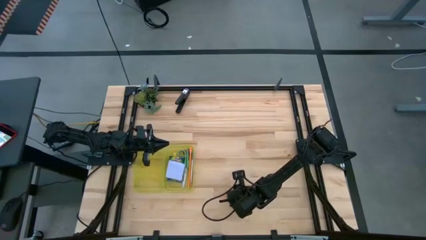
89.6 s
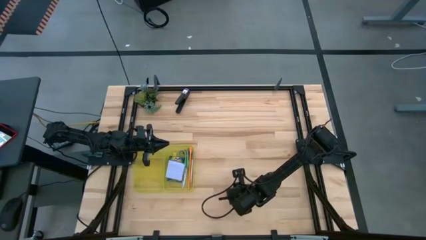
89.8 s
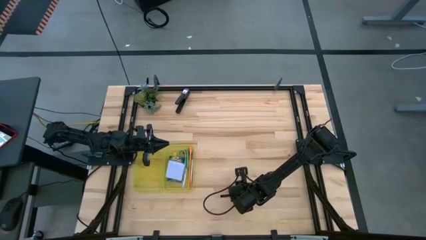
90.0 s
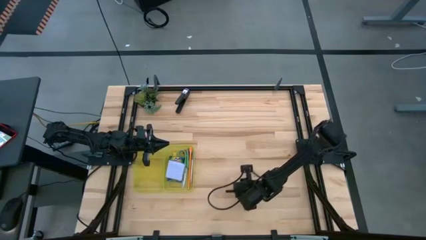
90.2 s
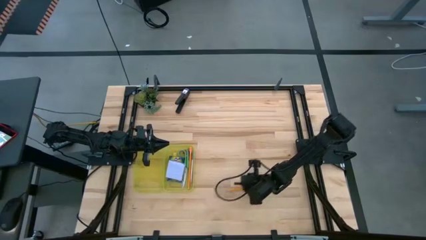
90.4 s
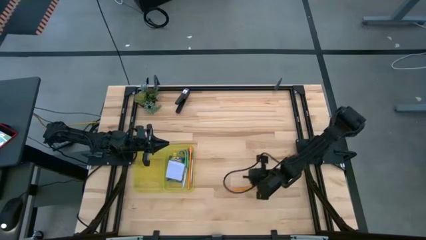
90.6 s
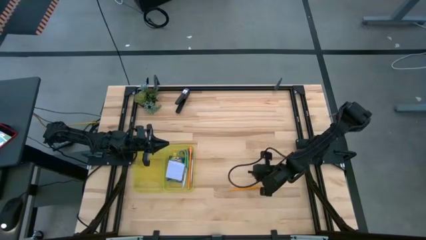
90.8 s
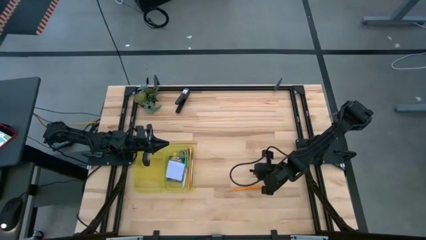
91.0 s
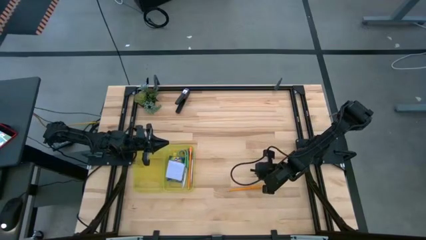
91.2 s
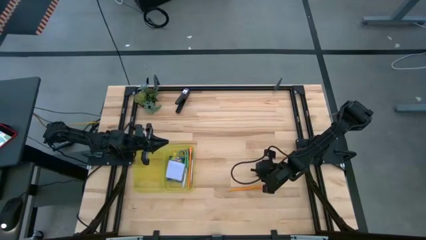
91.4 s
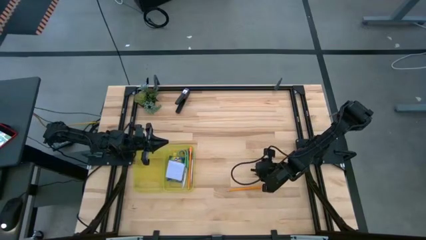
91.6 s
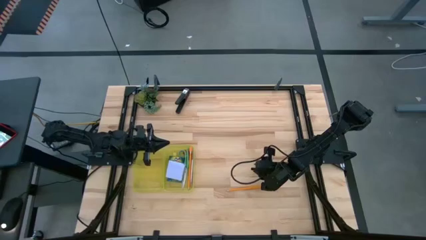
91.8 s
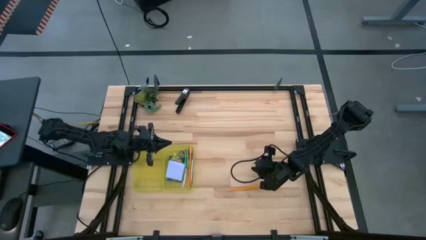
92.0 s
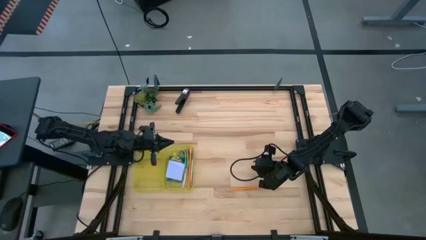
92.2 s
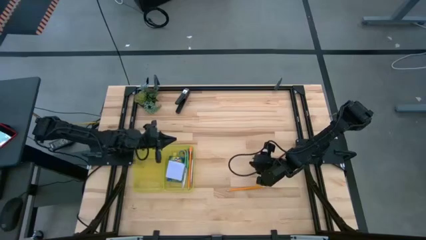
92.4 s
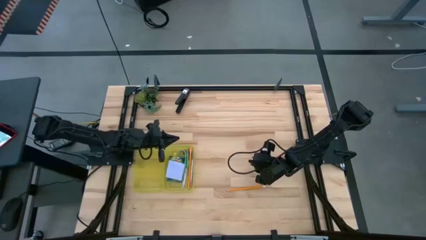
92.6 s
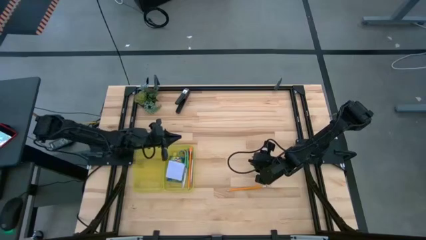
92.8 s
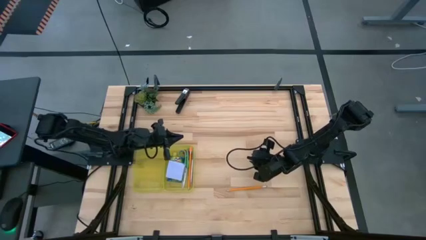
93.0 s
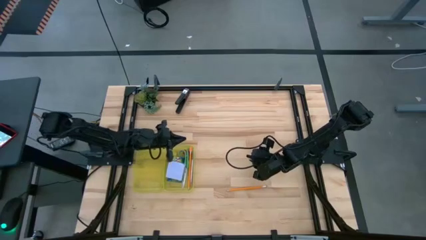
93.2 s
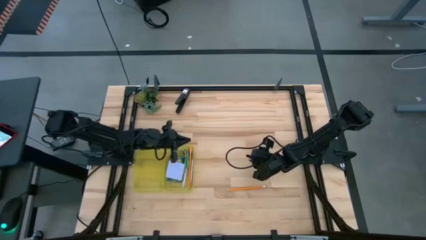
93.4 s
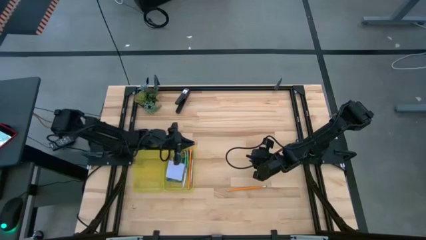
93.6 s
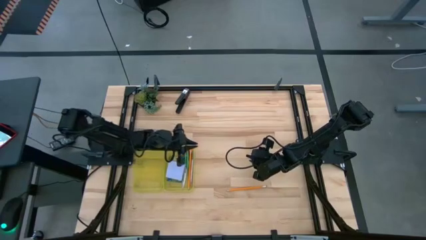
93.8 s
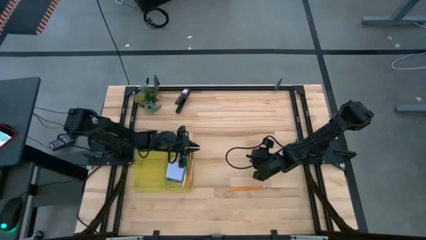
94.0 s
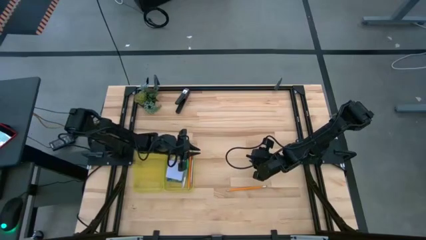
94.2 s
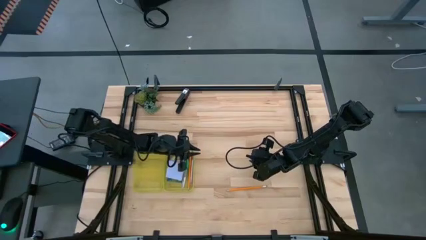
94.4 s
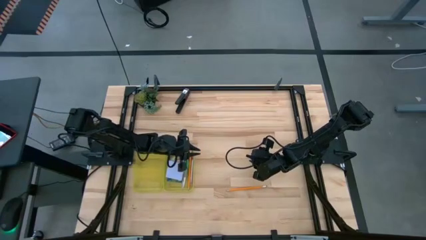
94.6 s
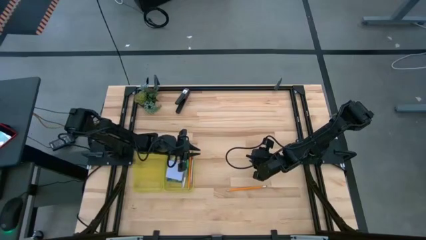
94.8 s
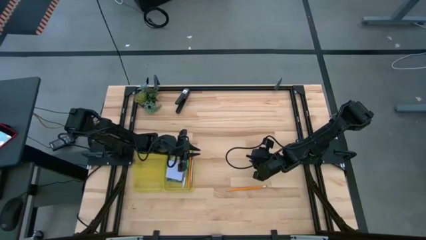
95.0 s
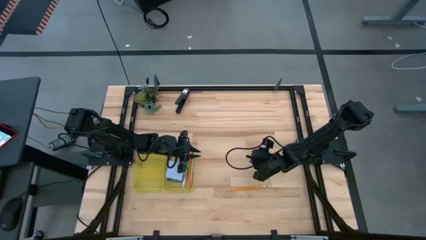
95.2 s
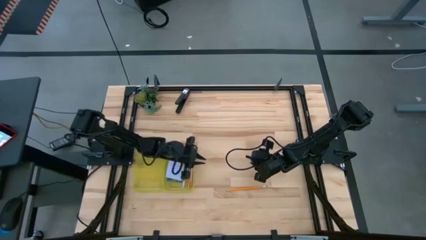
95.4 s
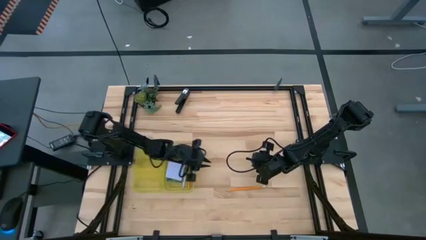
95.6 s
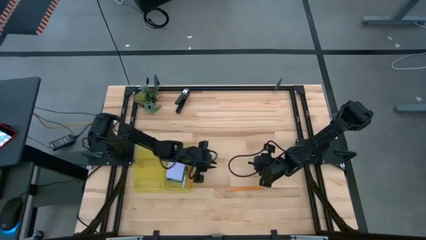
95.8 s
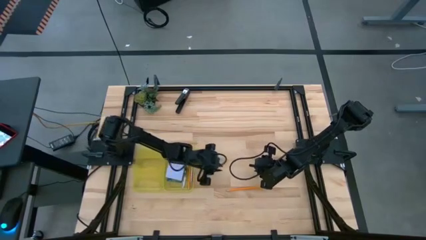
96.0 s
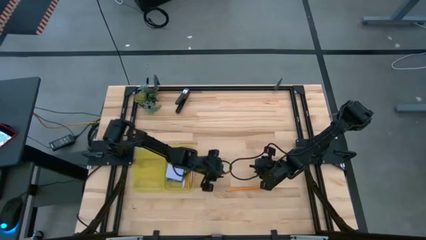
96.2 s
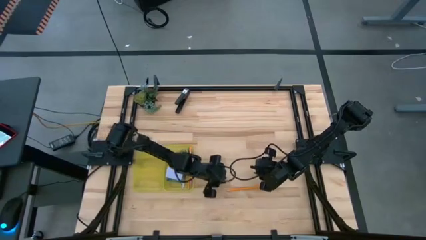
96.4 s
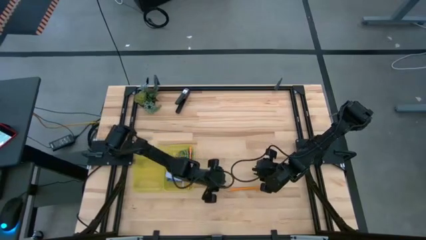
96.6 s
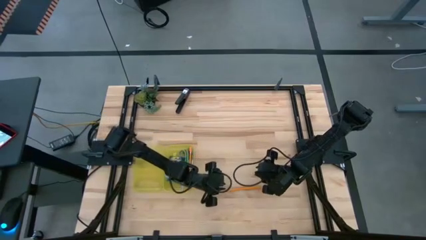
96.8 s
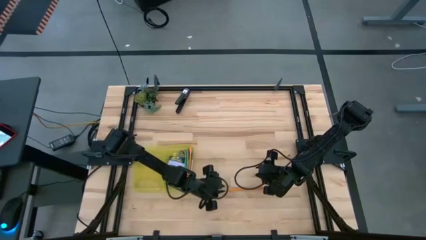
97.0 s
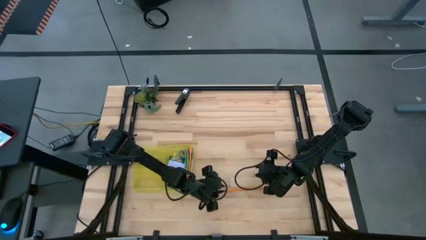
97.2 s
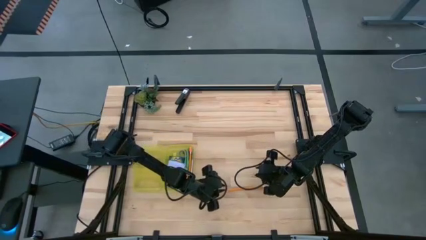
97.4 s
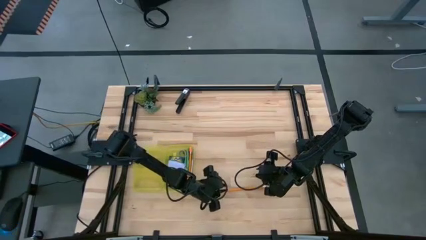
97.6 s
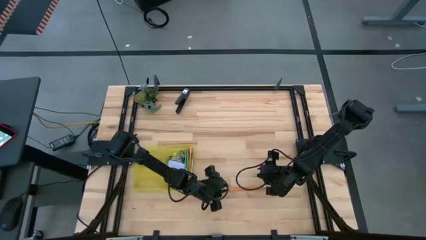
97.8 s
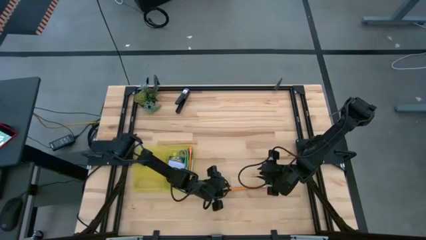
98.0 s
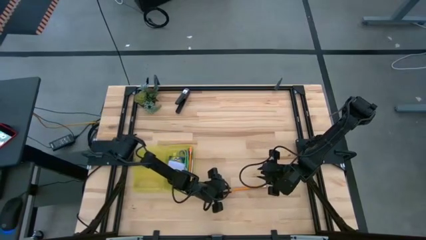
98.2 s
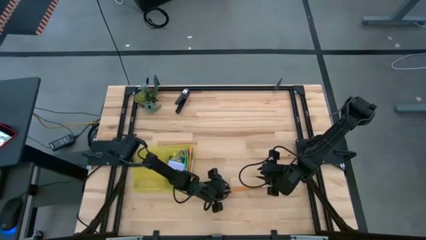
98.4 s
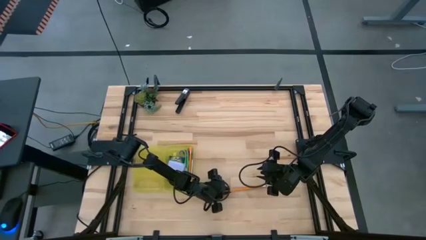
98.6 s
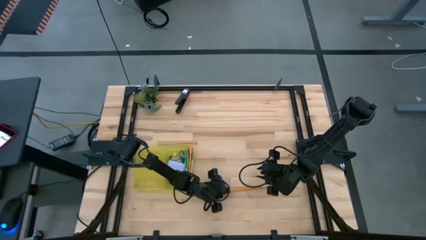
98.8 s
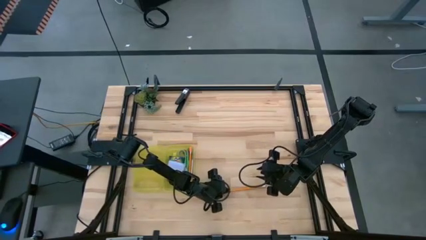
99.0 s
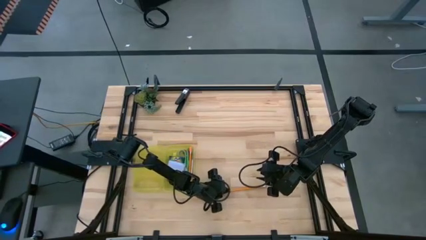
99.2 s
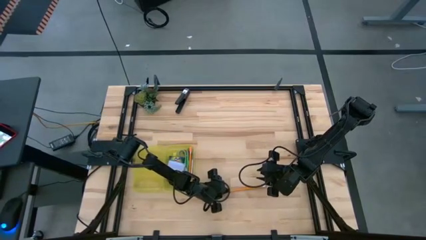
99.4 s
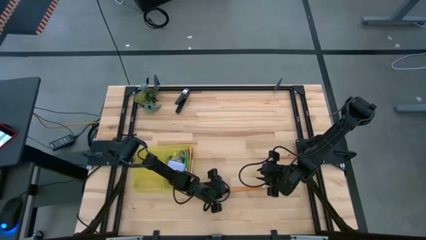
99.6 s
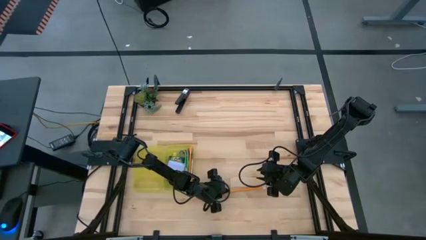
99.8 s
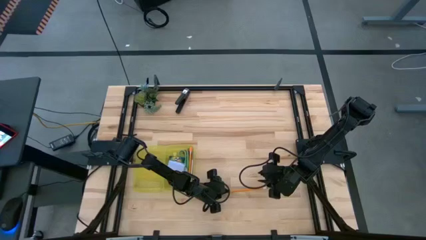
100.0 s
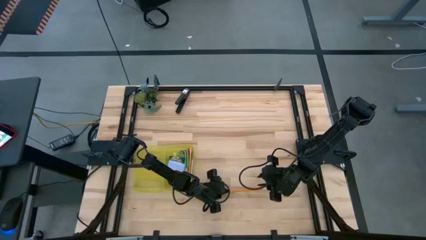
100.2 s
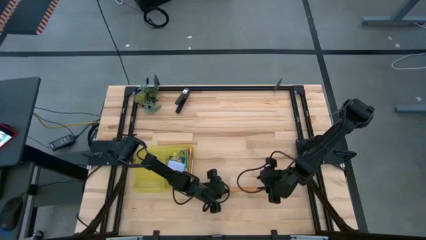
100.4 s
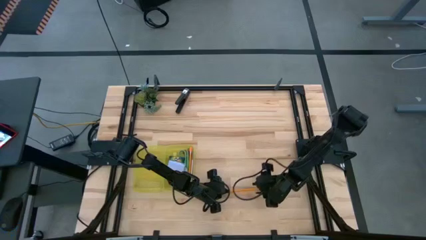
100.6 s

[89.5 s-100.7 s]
Task: Pack school essentials
Put the orange pencil into the yellow pencil box

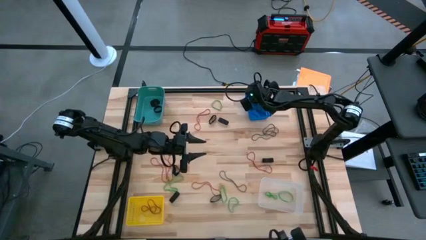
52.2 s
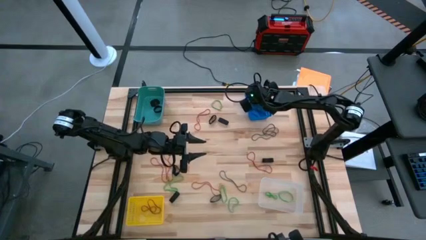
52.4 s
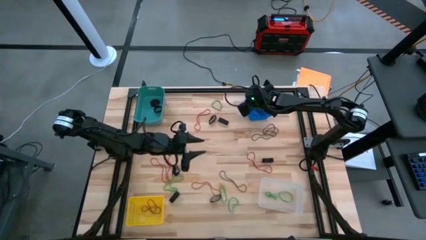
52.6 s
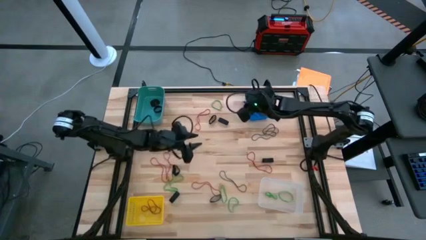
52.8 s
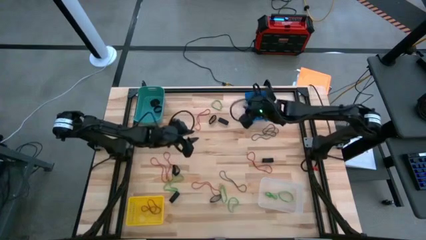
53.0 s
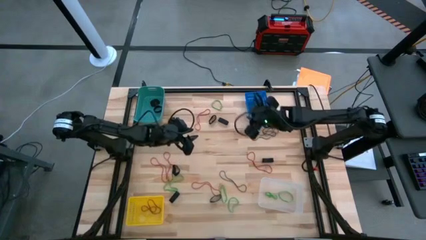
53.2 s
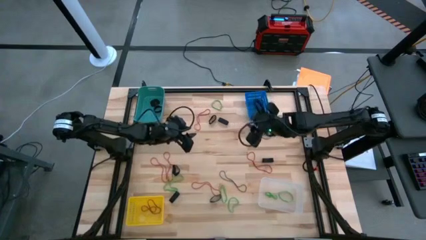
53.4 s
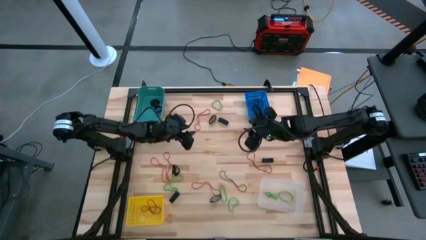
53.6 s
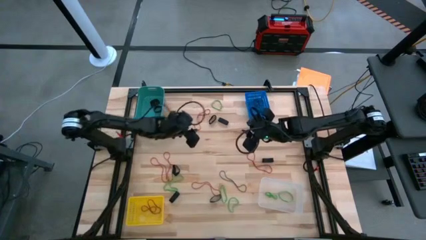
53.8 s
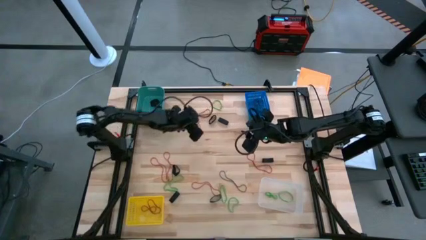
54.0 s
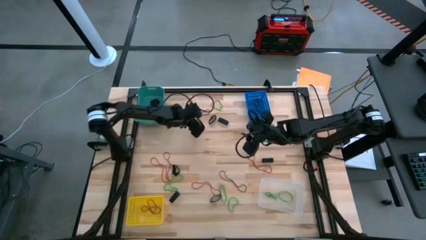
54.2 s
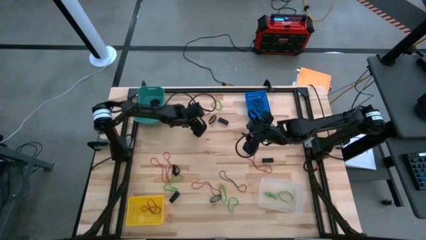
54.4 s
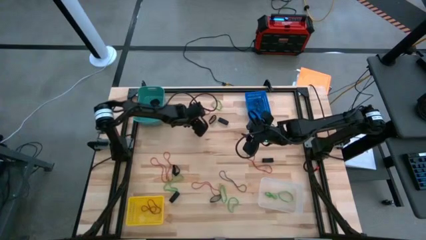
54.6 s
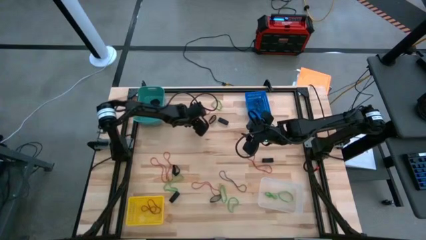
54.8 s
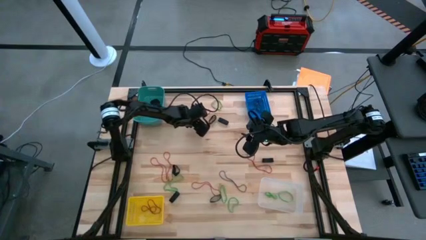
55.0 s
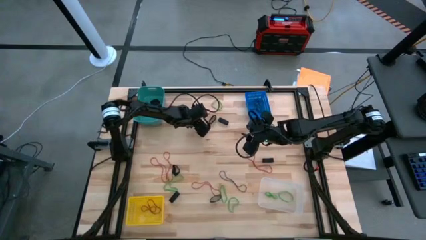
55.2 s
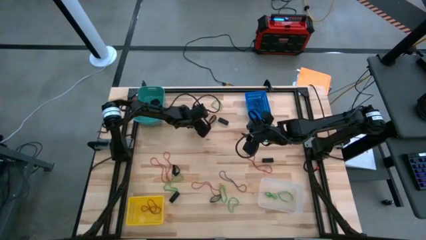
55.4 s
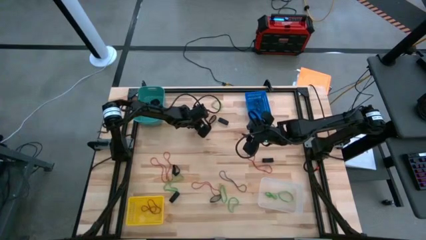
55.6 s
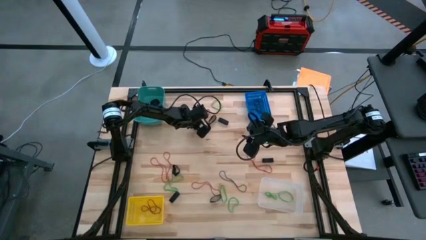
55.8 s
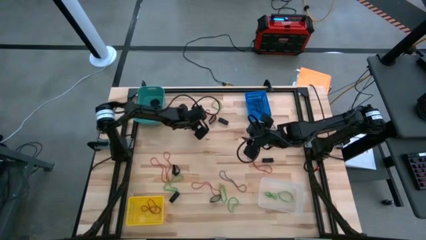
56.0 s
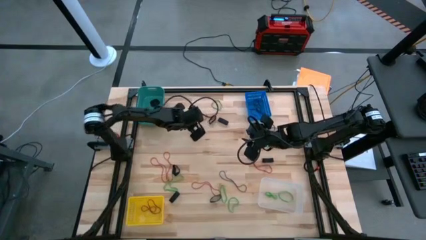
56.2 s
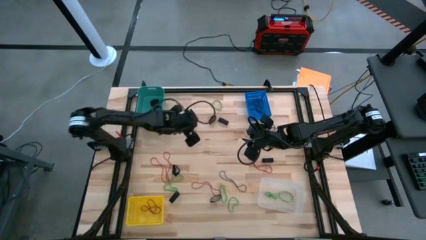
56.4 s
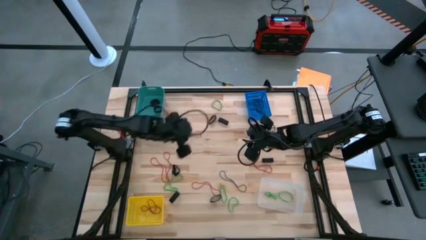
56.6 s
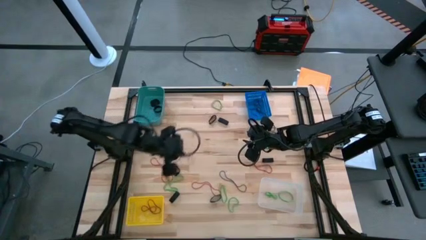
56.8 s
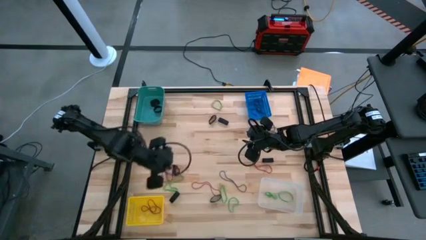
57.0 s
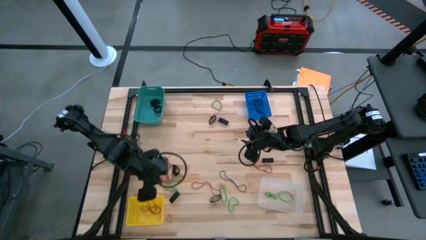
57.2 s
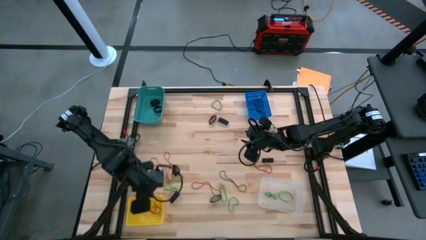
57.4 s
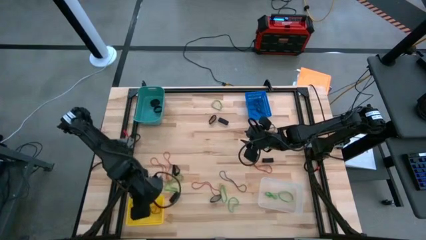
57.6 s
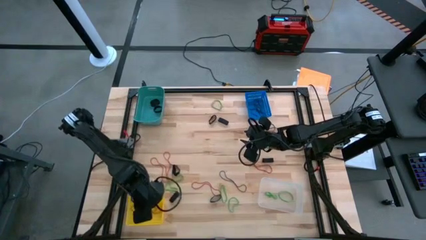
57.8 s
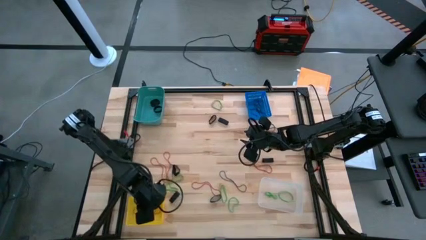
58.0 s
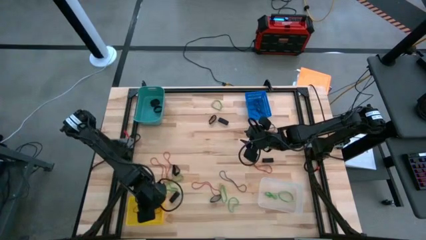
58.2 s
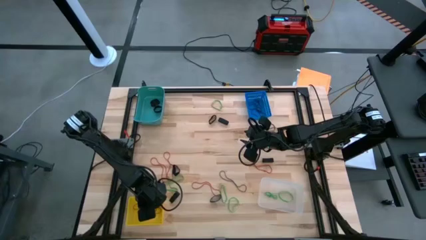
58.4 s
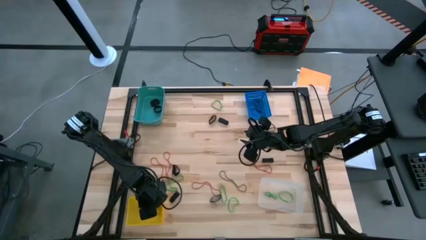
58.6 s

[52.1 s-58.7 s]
Task: Sort rubber bands into baskets
Put the red rubber band into the yellow basket
